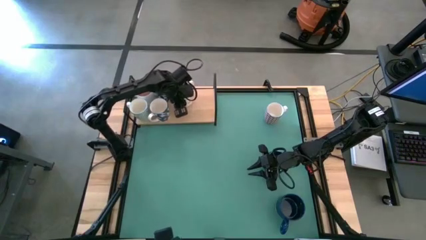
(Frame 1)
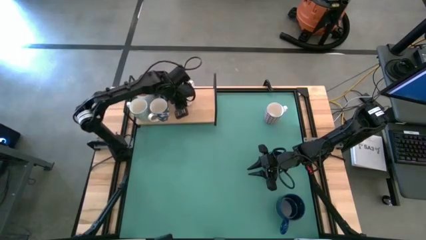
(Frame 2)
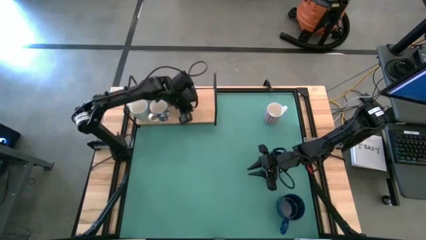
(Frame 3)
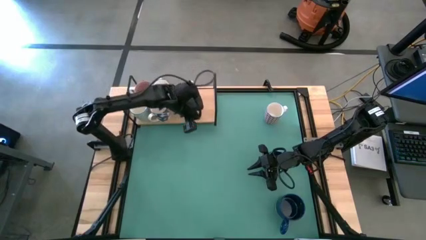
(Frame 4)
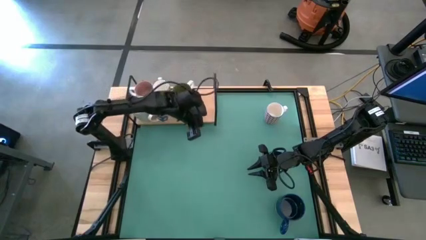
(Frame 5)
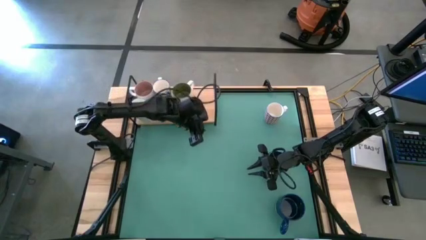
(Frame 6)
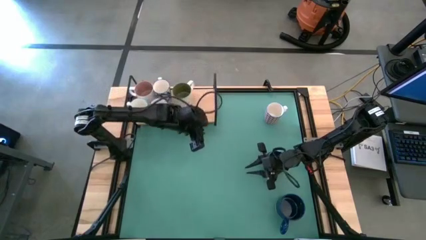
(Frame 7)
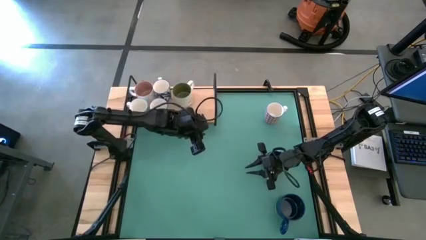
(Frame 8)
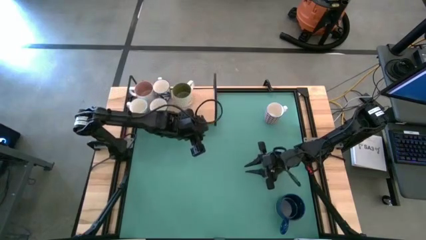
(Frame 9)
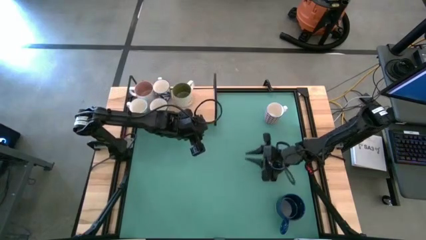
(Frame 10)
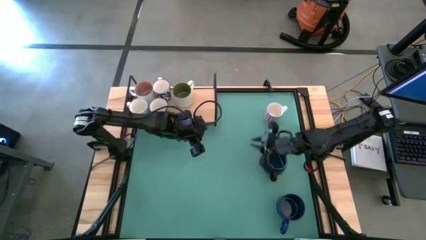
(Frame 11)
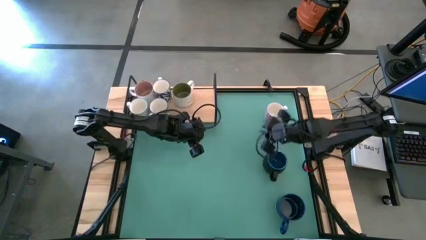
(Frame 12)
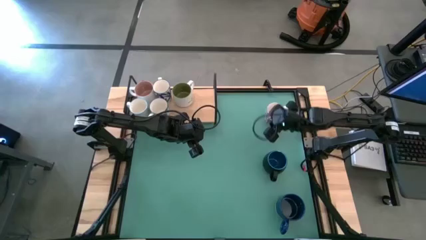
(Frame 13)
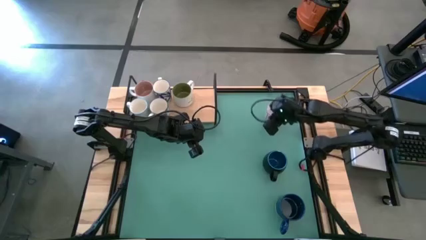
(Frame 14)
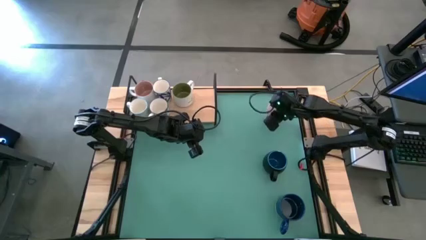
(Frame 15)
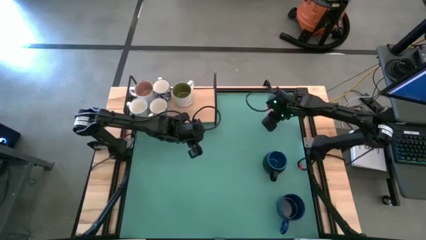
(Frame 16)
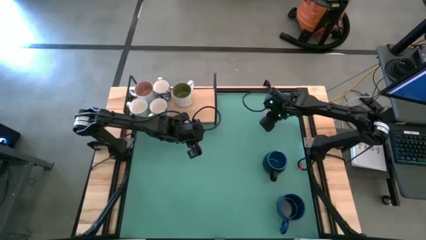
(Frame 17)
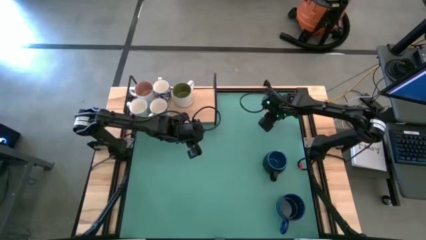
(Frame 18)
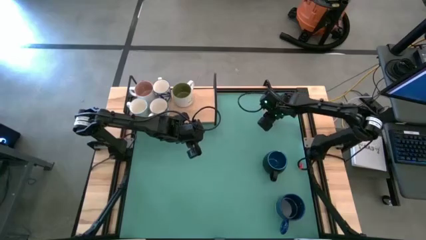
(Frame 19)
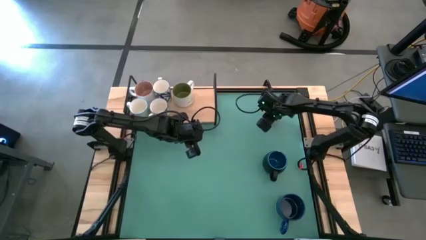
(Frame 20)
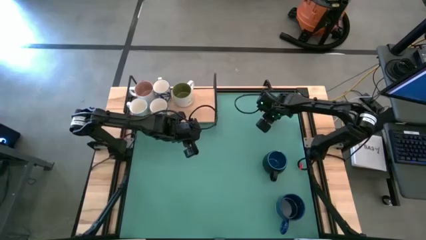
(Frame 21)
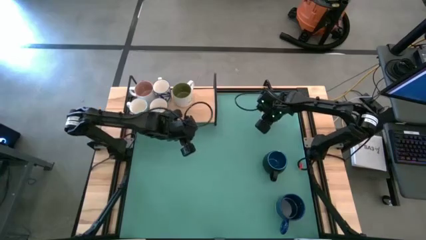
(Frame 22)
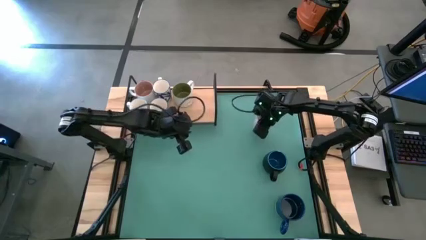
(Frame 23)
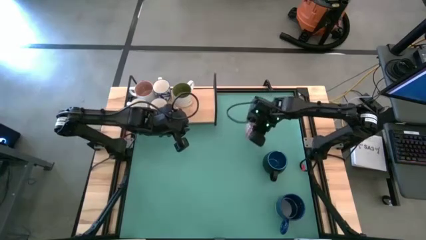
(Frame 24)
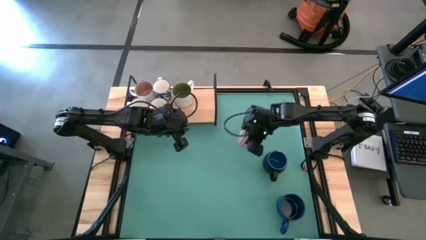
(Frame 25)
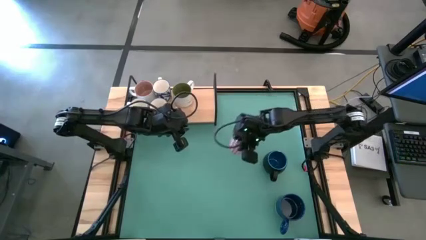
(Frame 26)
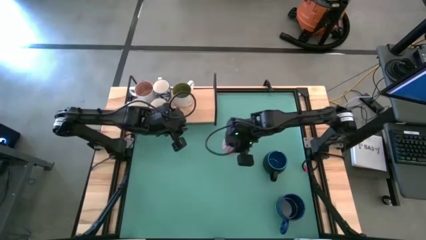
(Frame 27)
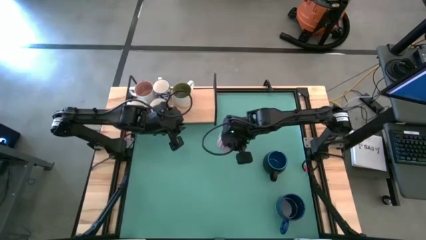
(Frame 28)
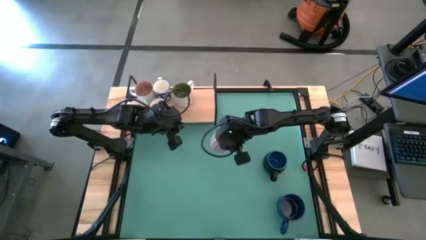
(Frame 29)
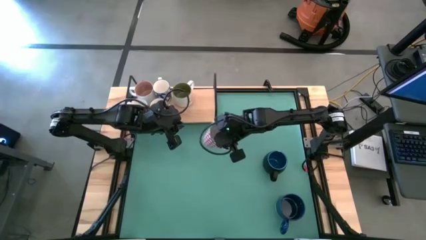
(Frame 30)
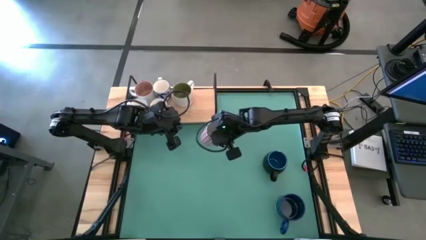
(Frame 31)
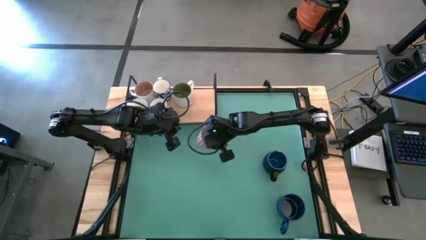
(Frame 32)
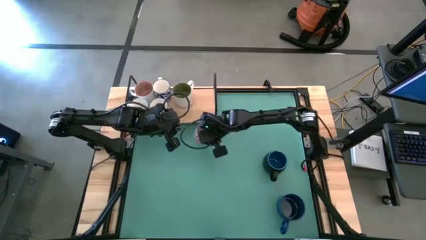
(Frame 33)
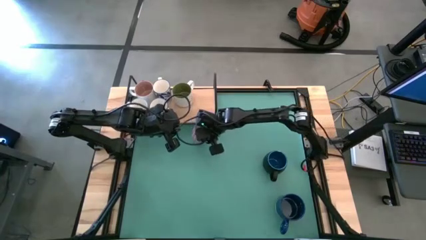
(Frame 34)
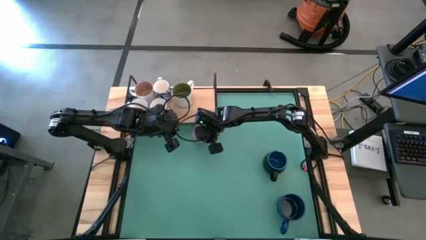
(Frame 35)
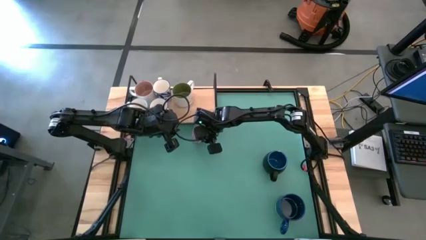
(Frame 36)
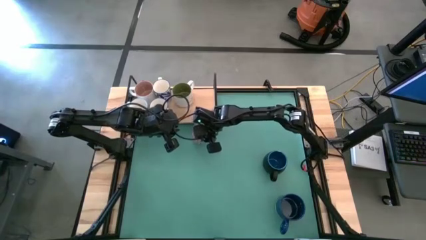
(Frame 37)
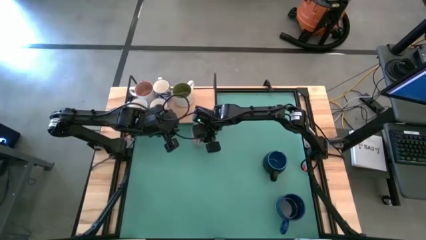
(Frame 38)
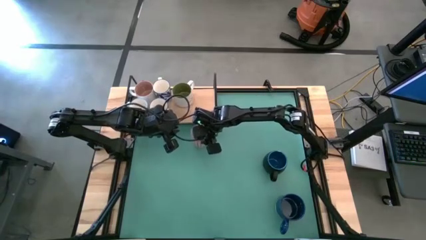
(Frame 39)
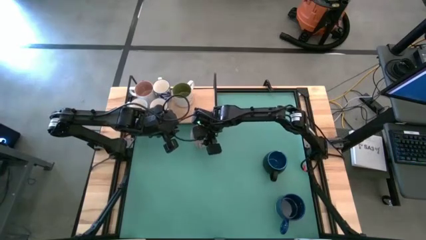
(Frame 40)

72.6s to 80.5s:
Task: Place coffee mugs
Move the red patterned mug to the center of the table

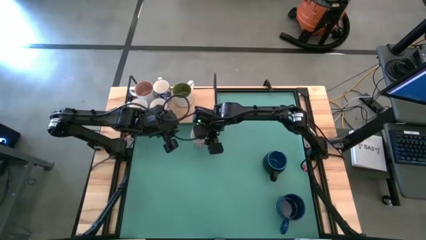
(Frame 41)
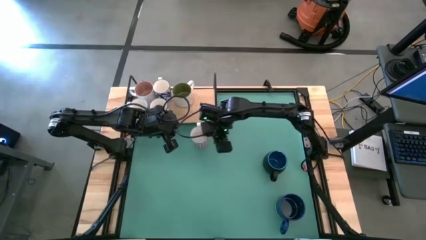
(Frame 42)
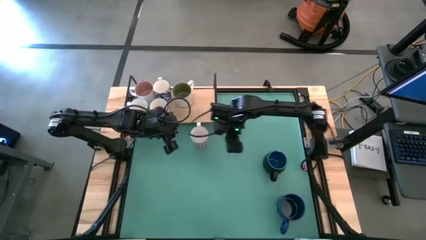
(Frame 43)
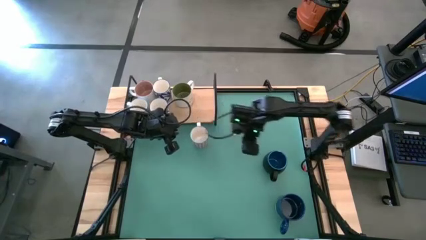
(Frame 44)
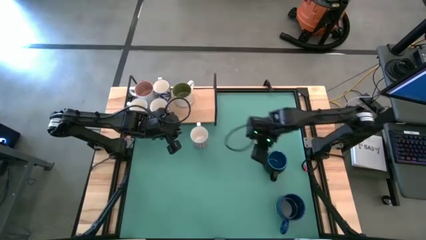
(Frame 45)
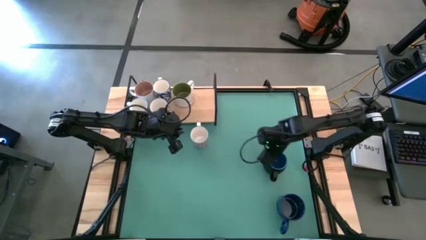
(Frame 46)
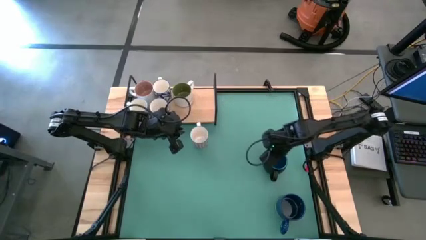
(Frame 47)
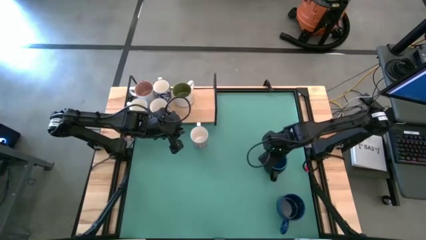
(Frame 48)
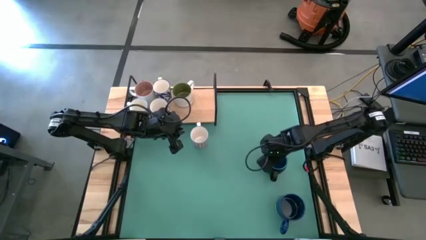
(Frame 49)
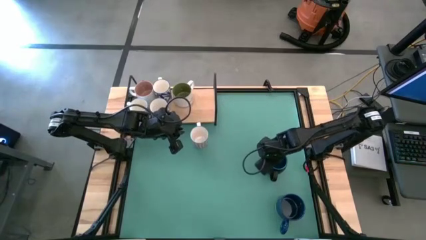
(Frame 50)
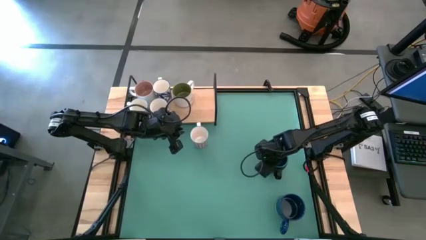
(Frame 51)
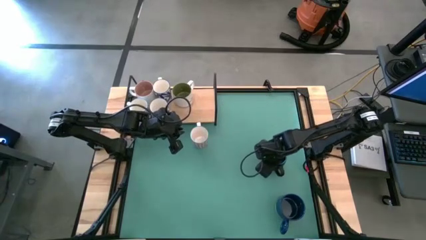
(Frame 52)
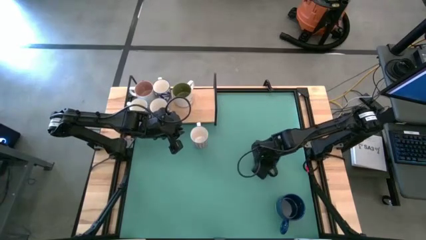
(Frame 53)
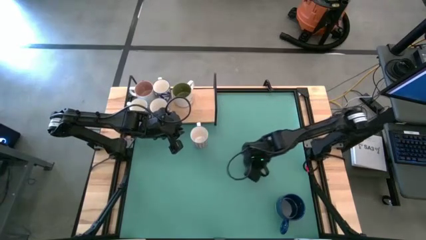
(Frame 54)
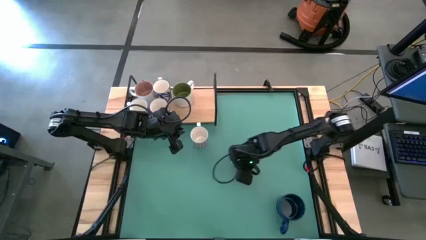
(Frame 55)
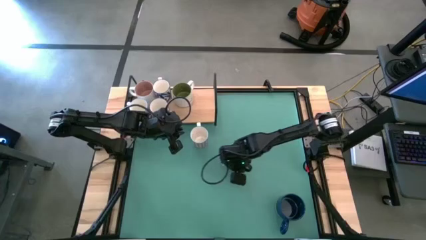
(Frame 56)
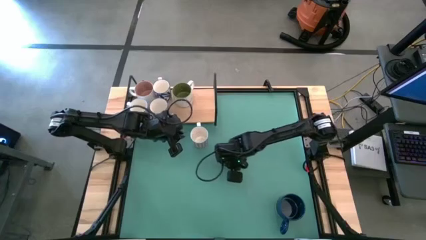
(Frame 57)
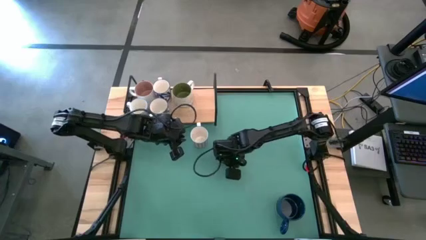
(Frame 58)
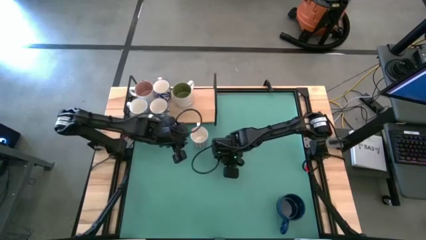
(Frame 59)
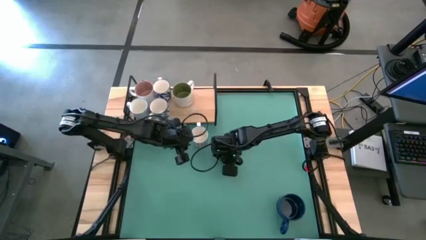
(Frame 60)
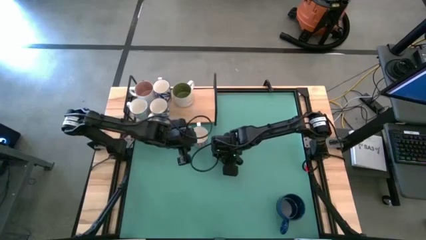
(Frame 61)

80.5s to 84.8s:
Move the black mug to the middle of the table

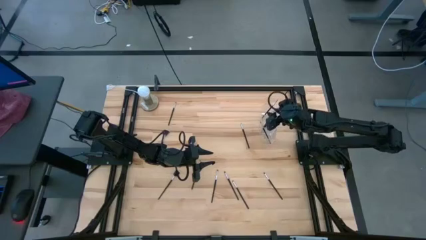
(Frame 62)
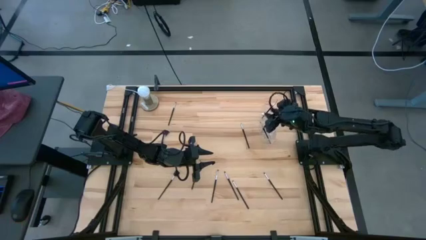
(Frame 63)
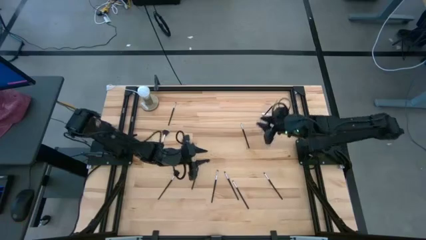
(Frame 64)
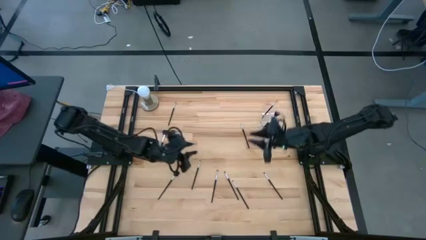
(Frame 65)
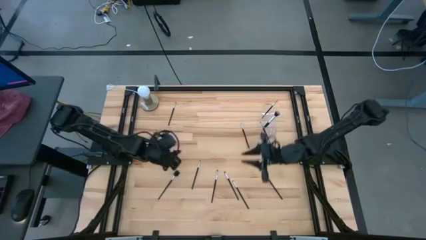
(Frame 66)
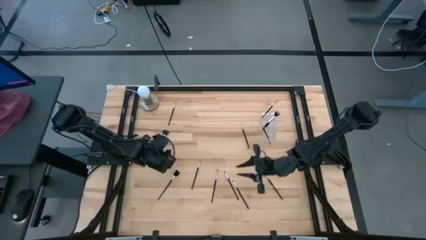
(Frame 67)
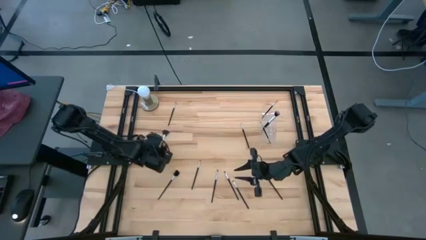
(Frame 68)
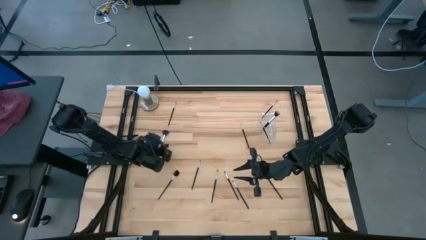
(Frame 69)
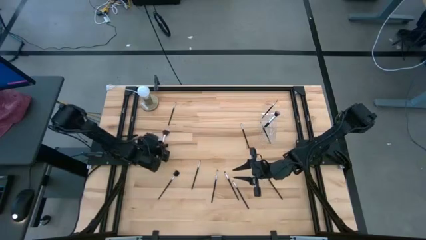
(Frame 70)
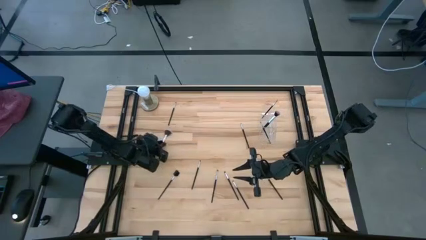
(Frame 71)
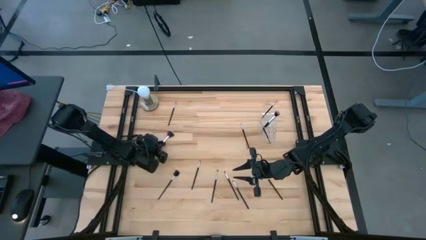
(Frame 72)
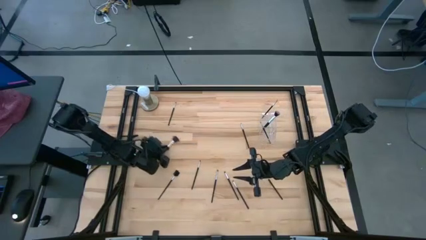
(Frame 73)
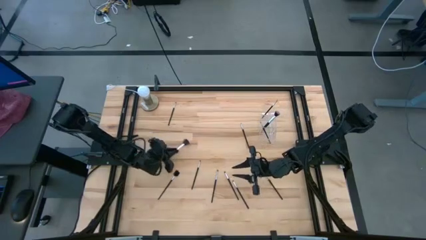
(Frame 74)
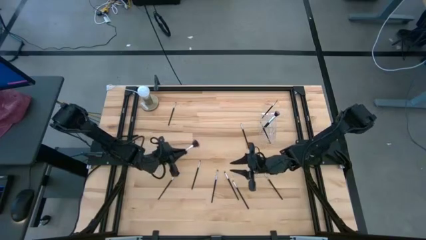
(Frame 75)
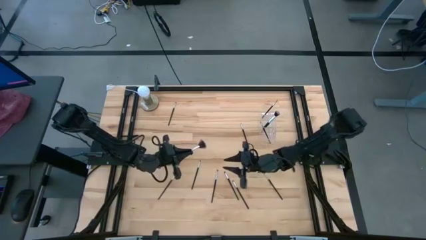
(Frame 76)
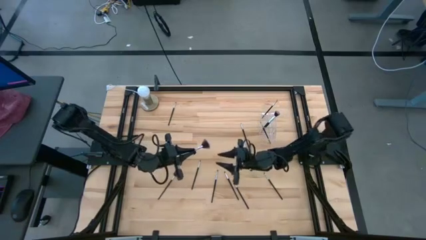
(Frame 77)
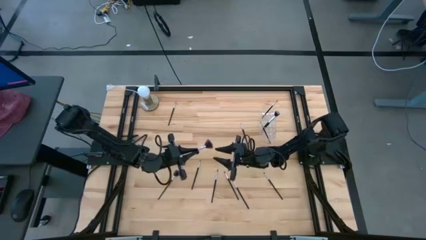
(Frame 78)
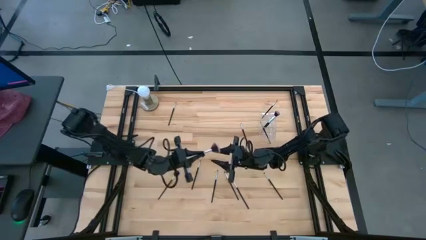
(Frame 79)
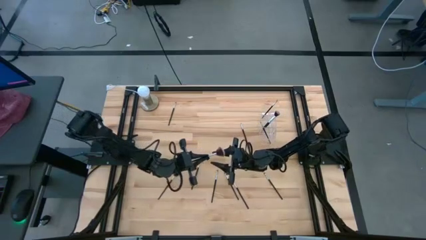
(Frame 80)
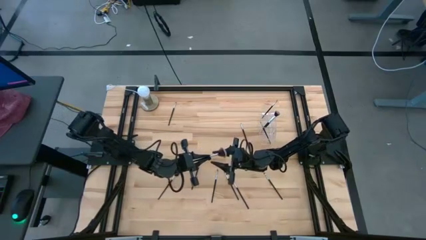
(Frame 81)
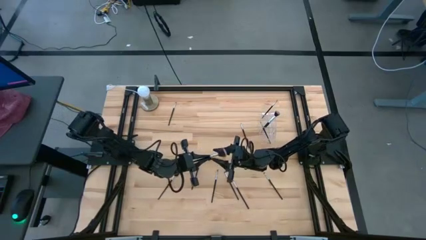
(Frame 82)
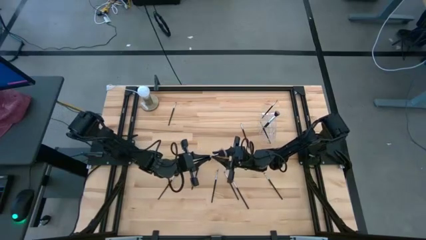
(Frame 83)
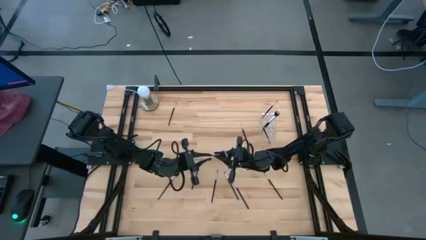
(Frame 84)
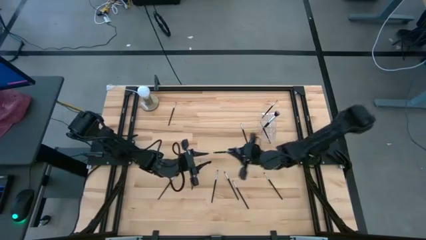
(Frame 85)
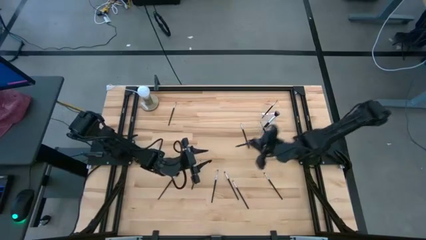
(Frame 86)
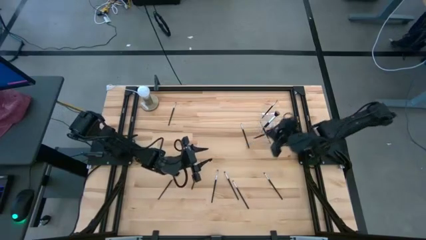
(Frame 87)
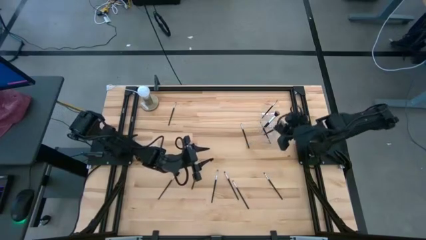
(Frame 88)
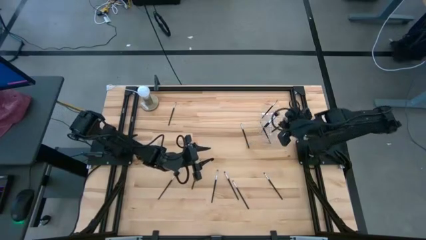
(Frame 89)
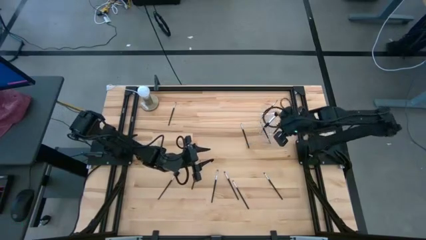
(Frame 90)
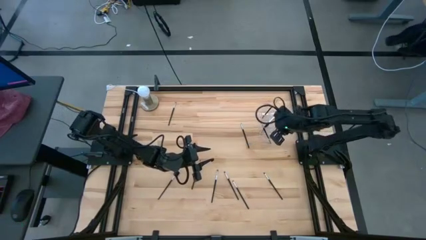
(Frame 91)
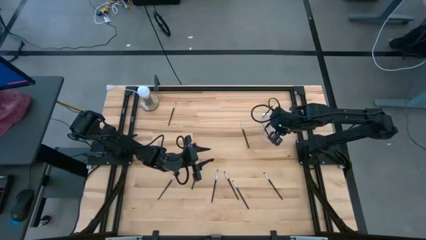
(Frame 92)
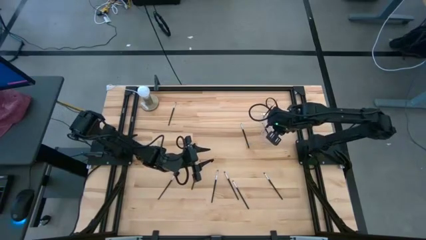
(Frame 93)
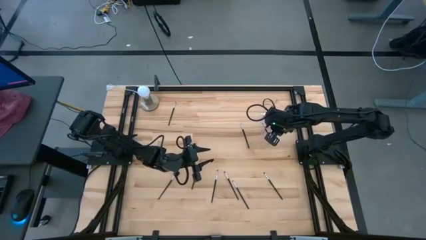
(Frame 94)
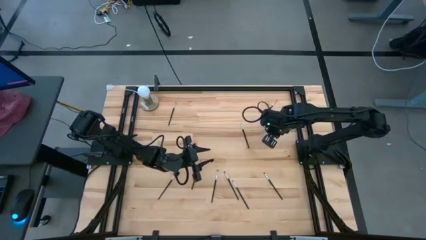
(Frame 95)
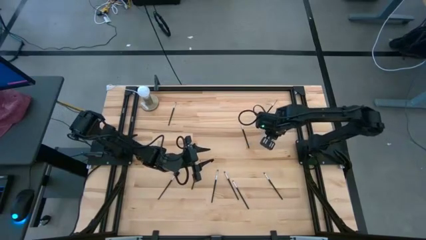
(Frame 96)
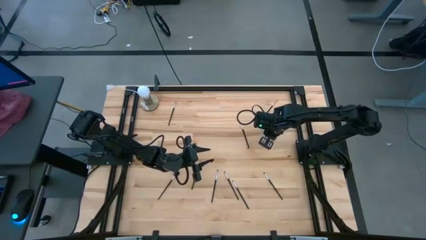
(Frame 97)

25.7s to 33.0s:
Task: Sort items
Put the silver highlighter brush into the transparent organizer
